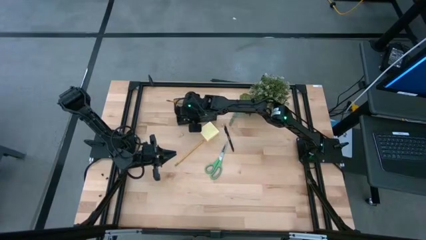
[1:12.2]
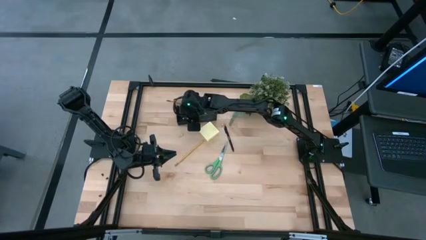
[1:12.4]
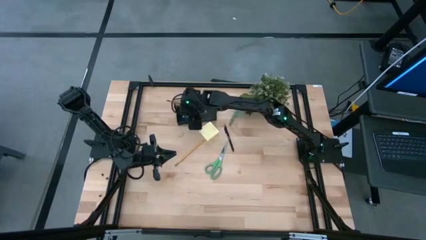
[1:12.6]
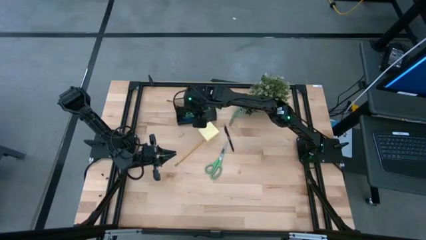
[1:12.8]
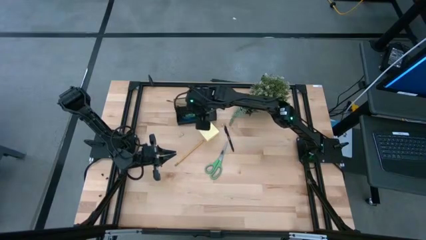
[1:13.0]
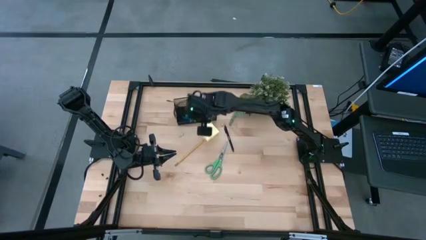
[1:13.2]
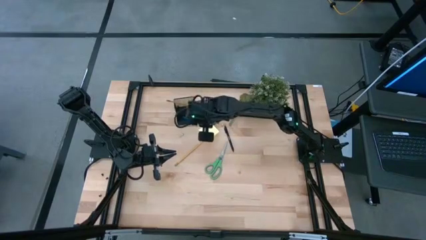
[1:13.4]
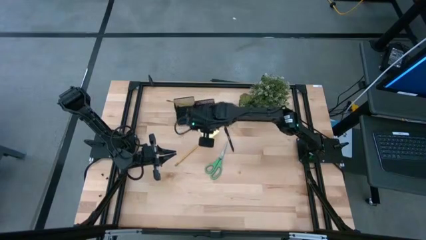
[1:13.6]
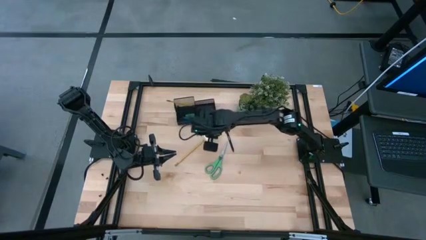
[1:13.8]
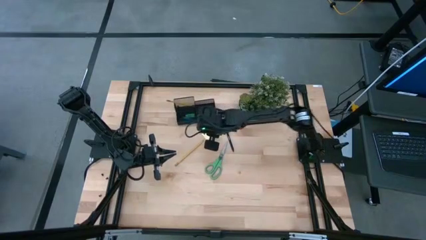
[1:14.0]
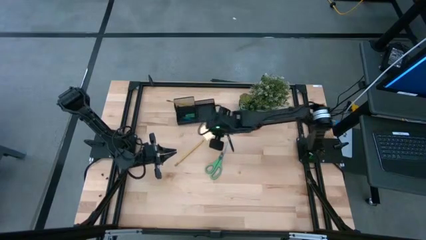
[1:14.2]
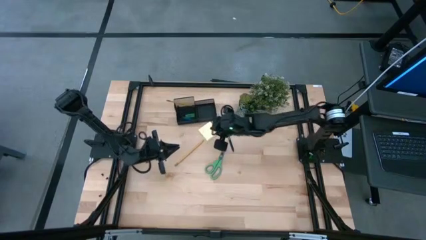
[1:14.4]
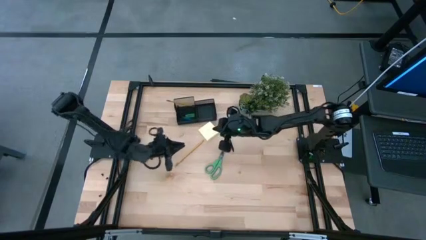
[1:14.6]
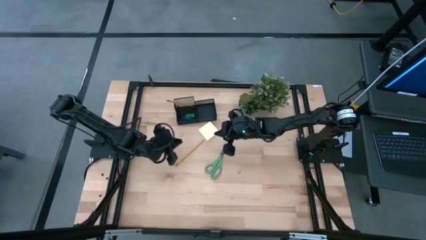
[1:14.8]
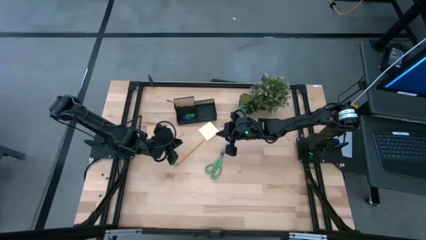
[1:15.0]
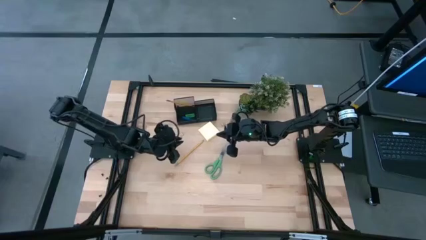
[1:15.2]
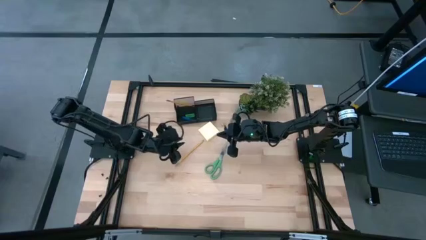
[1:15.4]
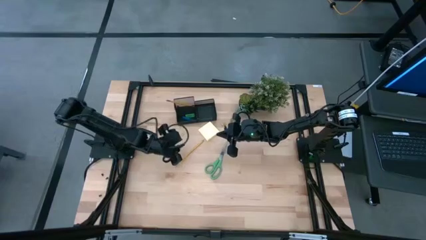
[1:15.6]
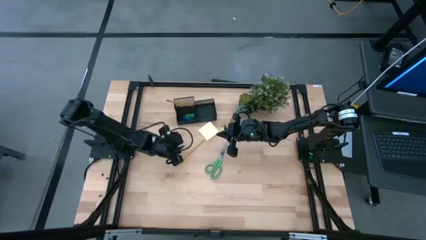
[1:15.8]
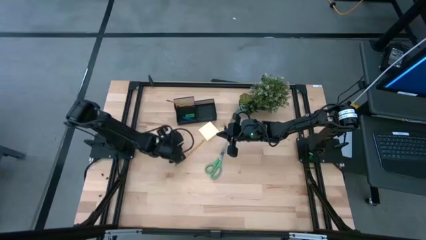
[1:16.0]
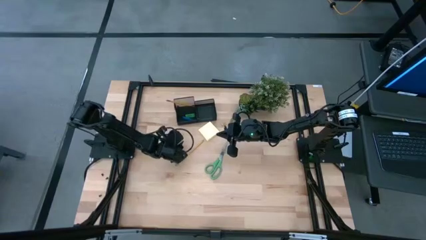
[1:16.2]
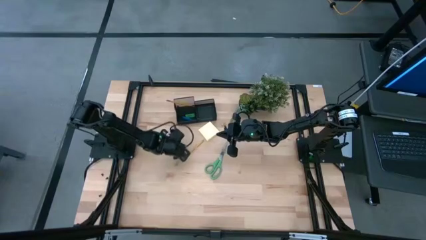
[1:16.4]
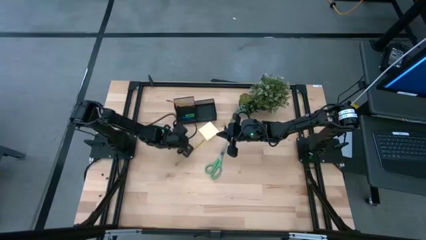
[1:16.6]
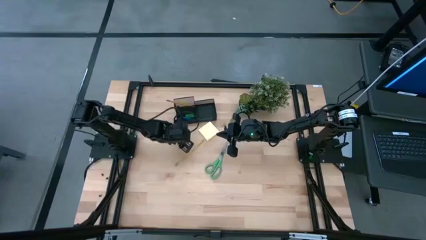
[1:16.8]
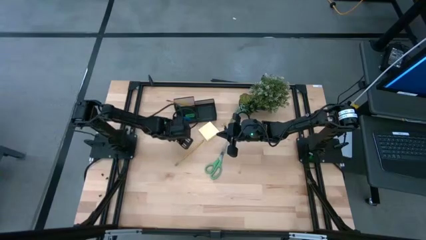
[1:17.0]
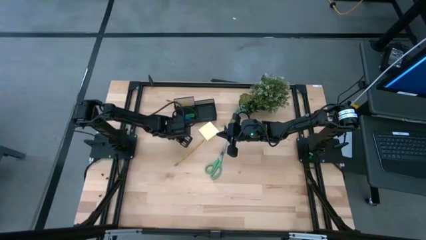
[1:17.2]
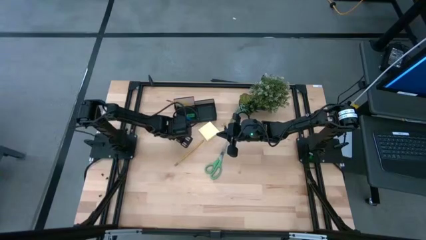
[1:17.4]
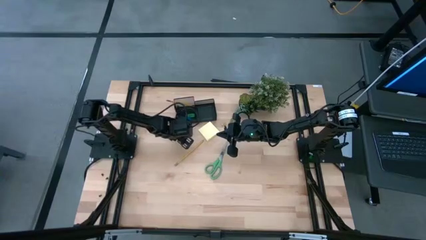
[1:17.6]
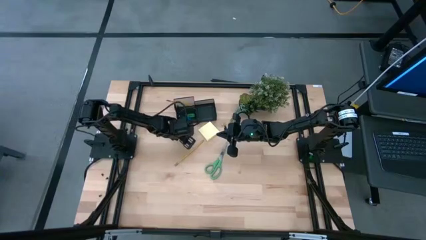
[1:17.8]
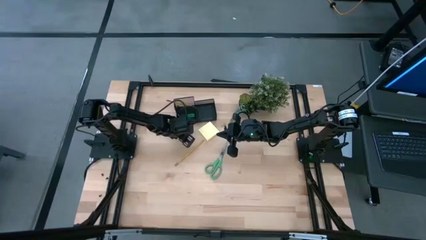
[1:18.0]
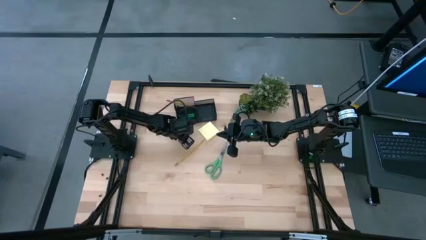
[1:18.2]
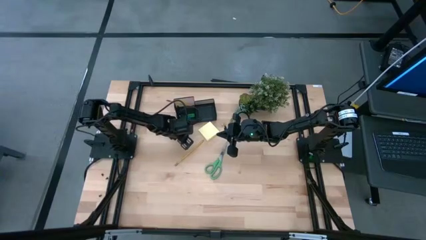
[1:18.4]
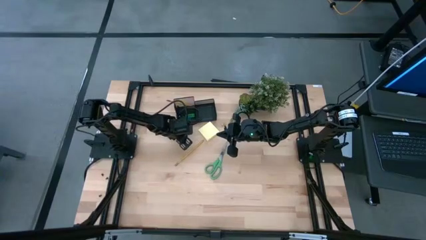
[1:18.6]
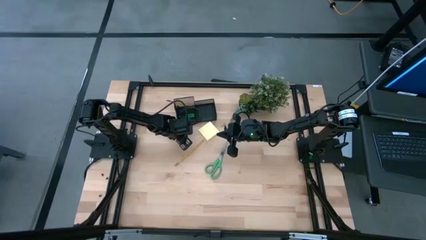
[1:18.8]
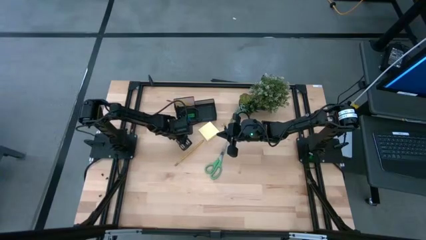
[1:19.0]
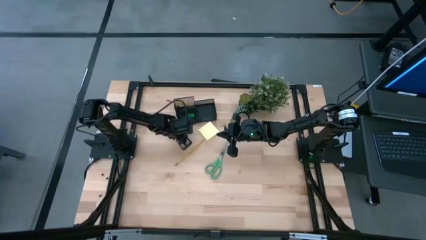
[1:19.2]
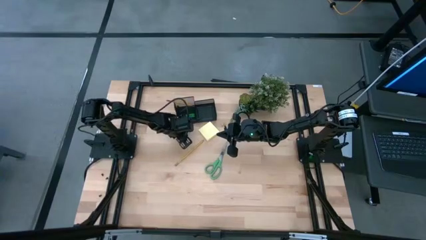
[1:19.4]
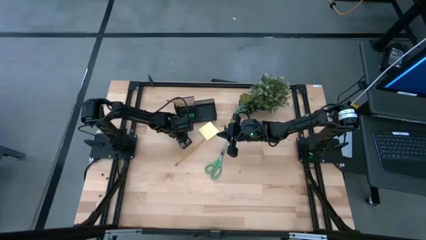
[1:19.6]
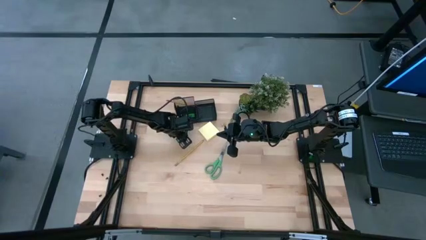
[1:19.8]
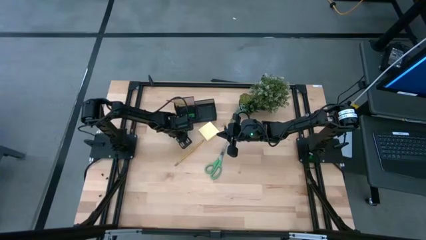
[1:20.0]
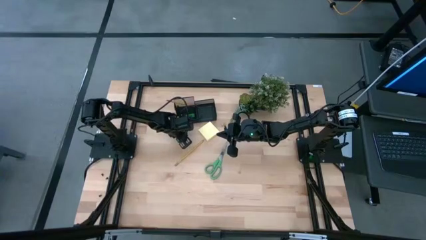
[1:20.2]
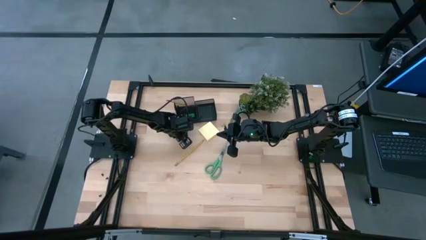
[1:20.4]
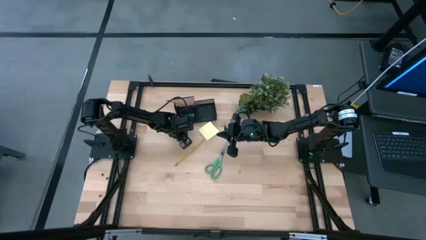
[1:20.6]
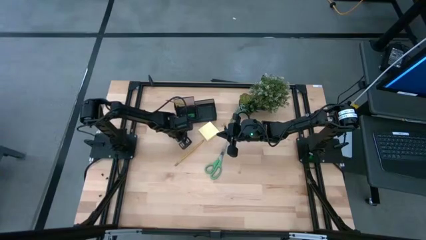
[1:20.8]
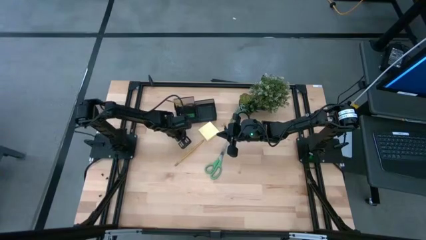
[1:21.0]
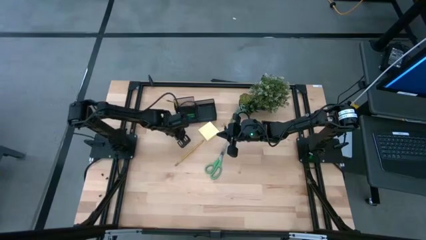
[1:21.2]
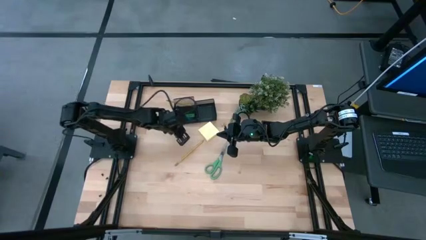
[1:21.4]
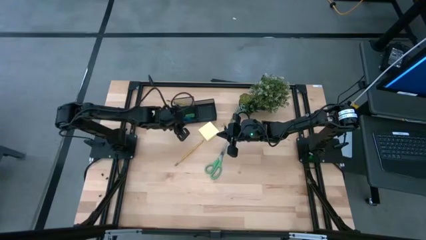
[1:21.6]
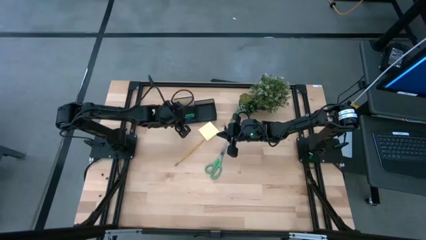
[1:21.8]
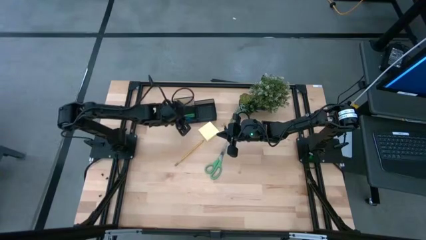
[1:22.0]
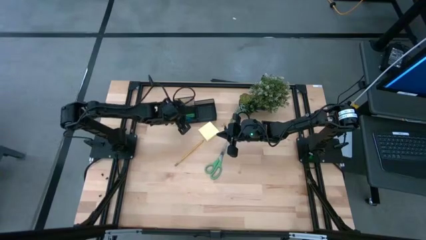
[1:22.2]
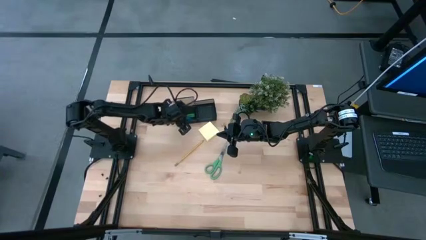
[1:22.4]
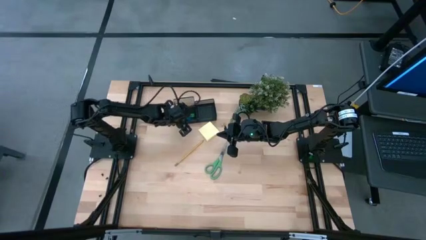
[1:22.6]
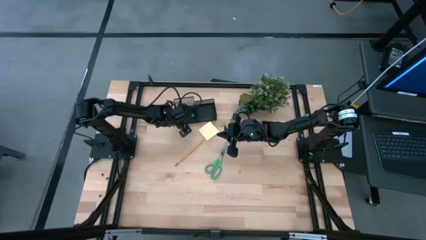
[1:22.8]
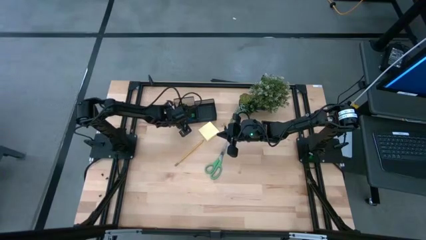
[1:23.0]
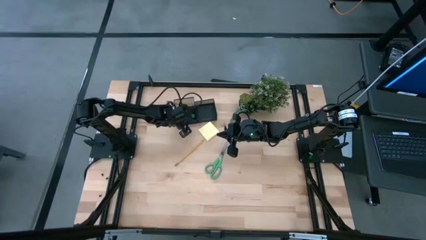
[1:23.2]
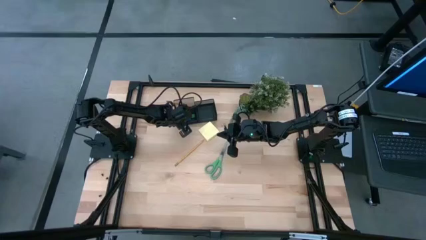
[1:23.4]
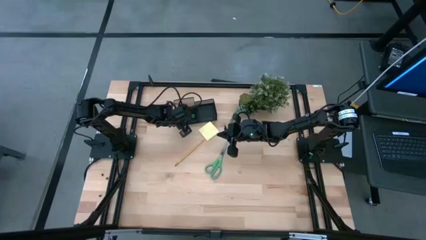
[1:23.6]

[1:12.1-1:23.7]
Task: Pick and place office supplies into organizer
Put the left yellow paper clip into the black desk organizer

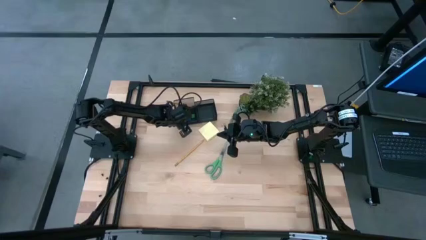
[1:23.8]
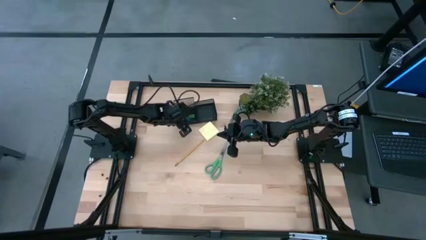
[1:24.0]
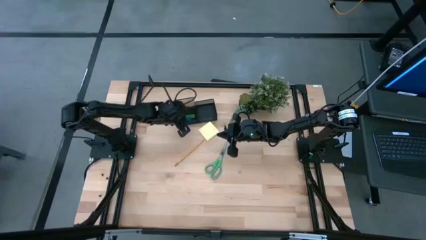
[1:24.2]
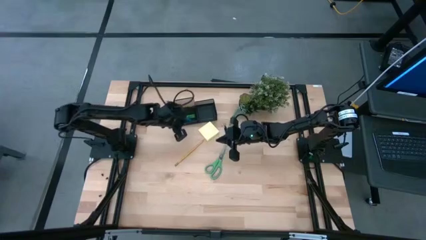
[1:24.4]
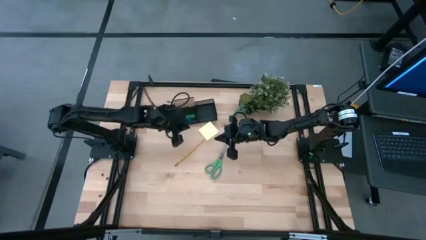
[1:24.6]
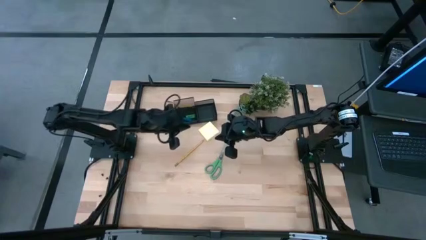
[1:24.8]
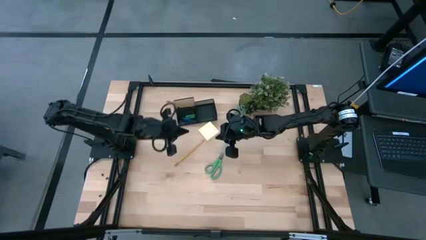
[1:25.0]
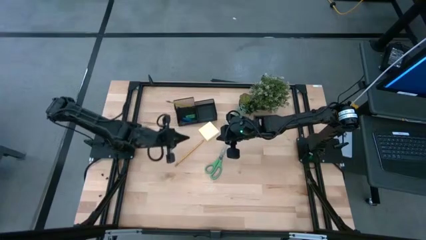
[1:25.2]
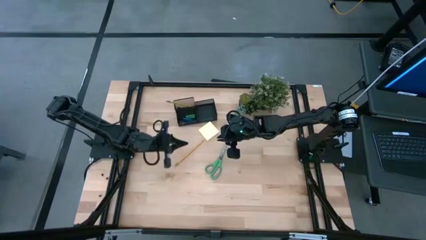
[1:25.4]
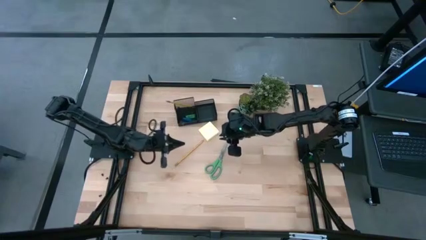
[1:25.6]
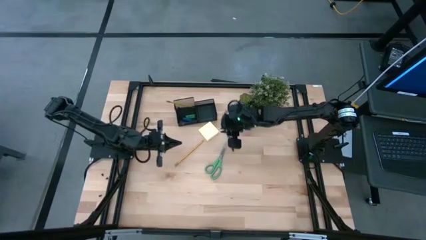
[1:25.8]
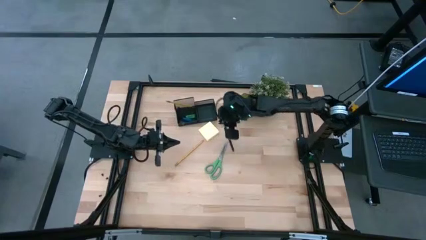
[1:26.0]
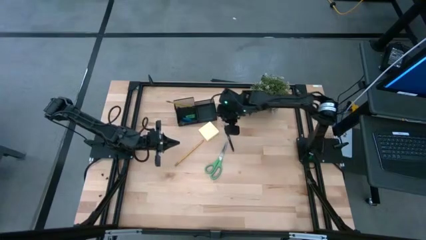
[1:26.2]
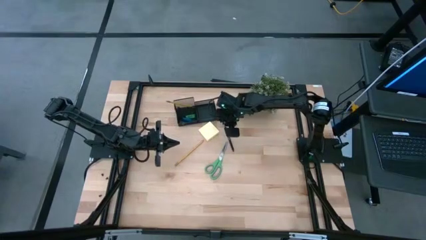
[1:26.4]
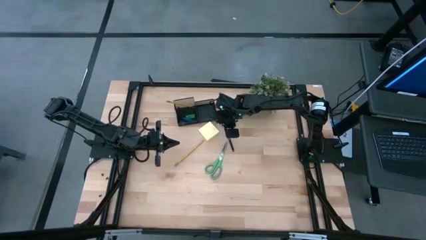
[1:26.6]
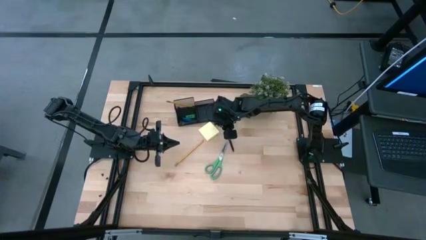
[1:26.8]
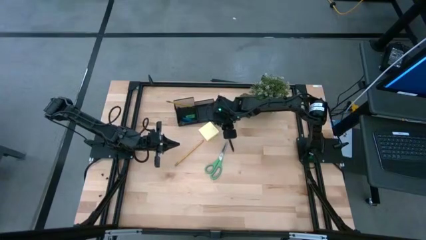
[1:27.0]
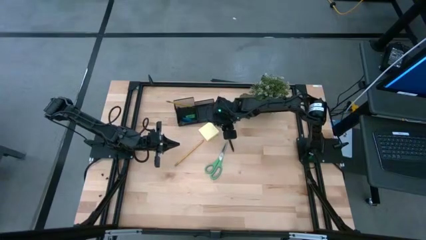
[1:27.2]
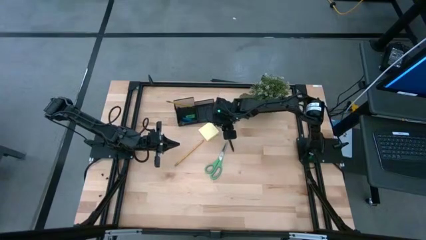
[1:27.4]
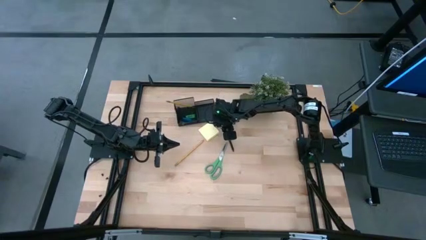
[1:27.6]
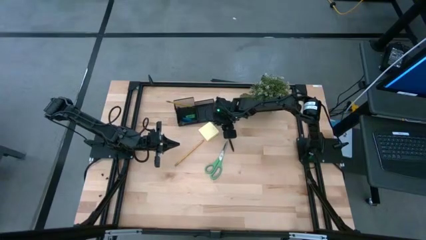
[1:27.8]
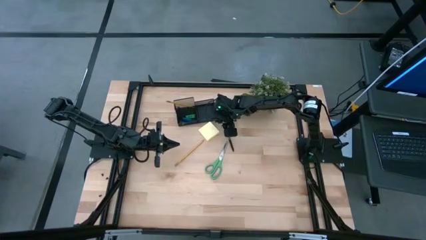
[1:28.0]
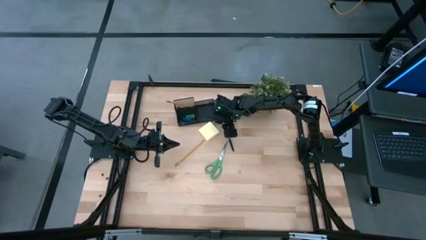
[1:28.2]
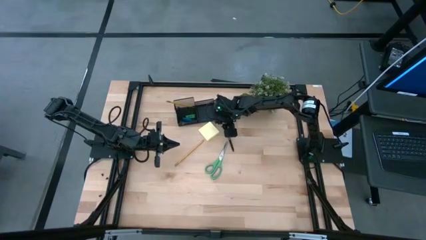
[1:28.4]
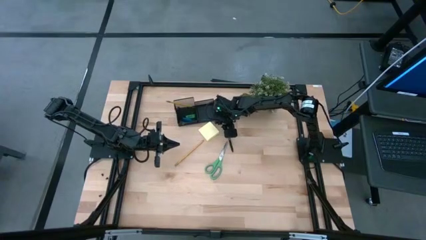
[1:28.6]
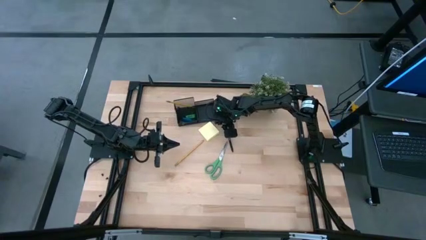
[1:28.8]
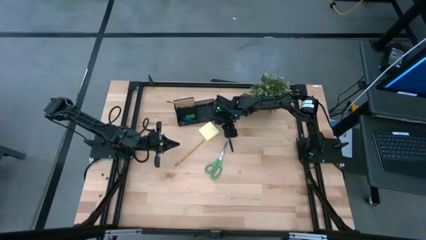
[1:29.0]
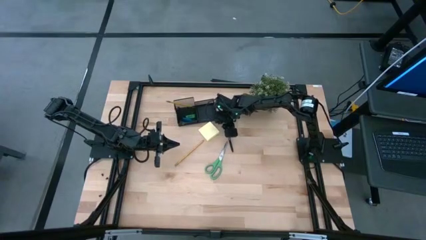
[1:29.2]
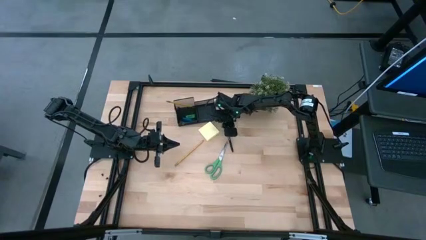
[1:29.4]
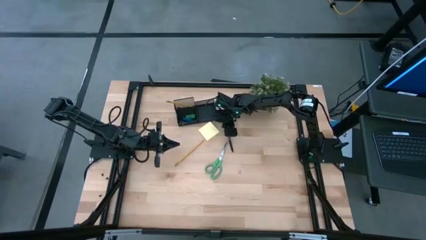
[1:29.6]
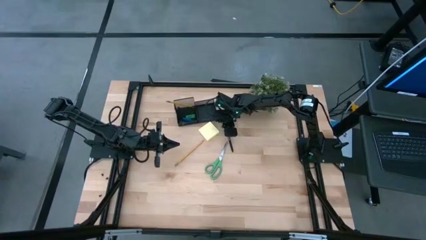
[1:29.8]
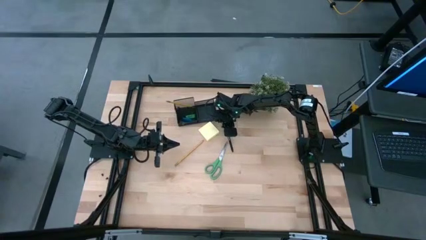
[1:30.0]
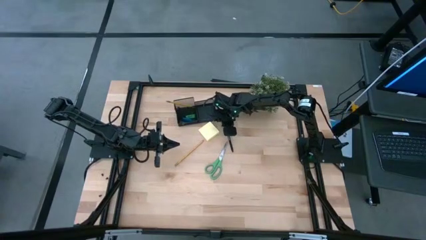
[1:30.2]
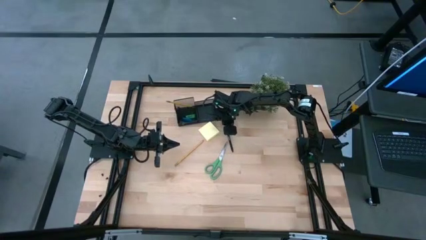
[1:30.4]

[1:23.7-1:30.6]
Put the yellow paper clip into the black desk organizer
